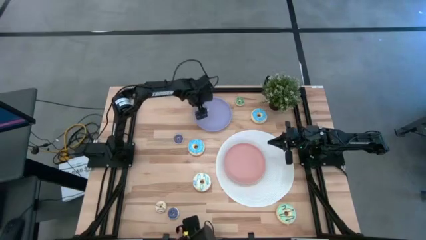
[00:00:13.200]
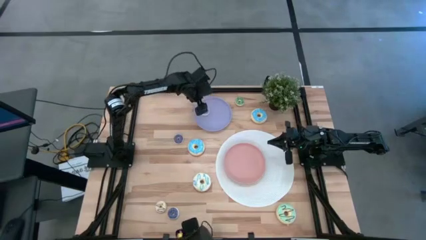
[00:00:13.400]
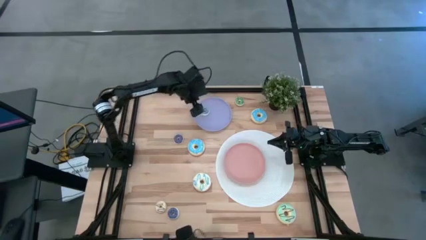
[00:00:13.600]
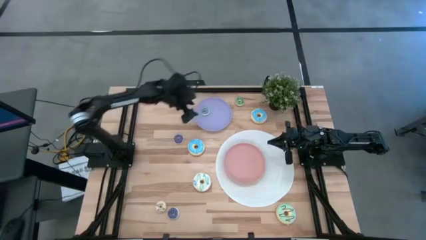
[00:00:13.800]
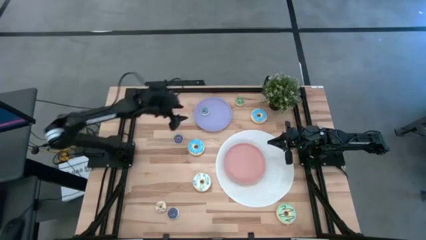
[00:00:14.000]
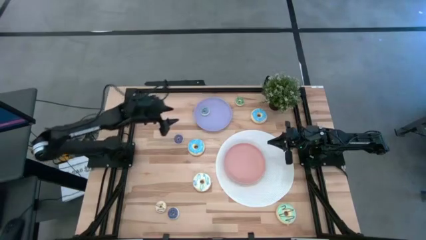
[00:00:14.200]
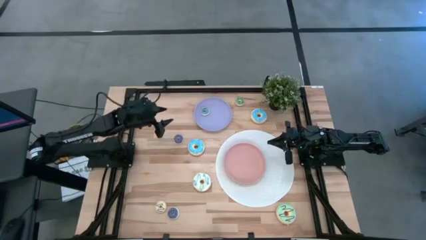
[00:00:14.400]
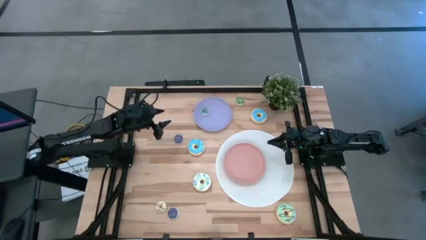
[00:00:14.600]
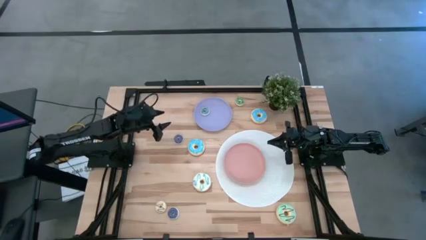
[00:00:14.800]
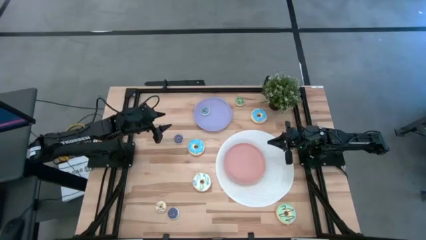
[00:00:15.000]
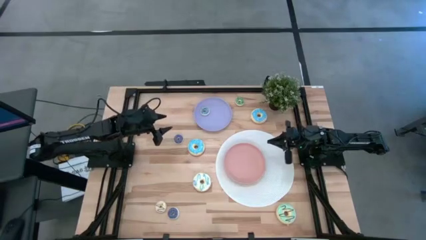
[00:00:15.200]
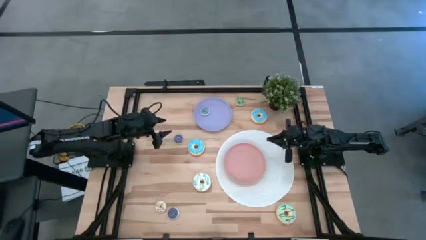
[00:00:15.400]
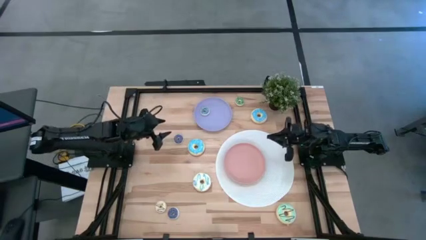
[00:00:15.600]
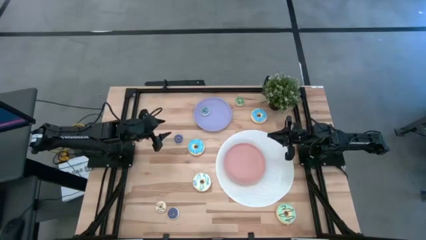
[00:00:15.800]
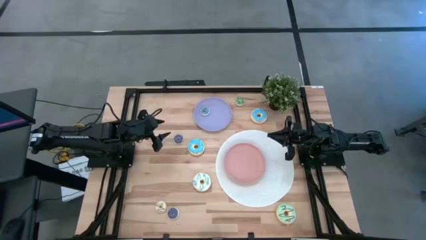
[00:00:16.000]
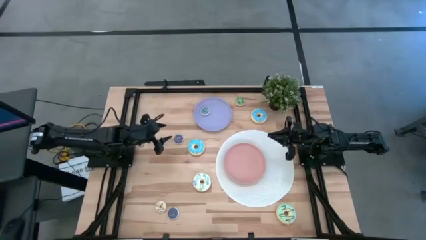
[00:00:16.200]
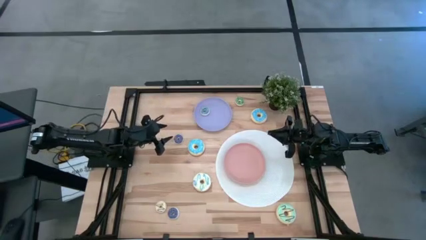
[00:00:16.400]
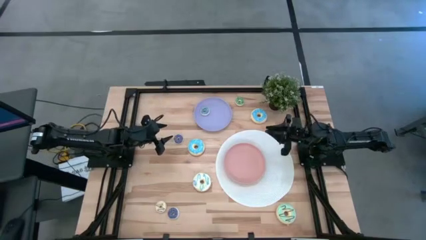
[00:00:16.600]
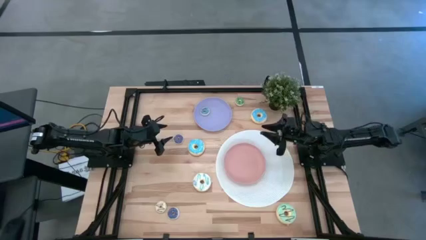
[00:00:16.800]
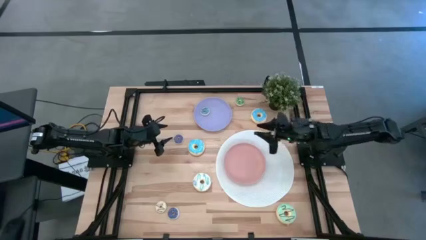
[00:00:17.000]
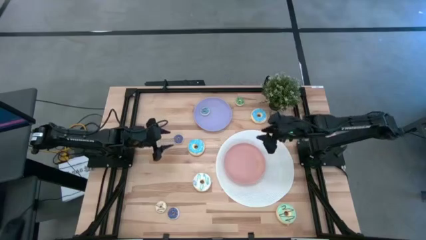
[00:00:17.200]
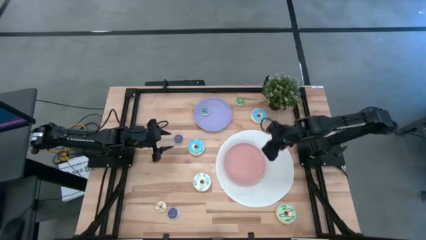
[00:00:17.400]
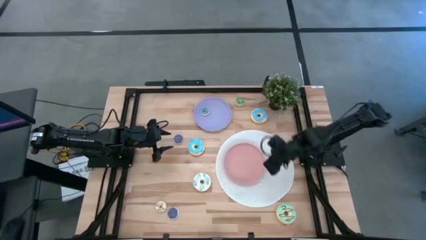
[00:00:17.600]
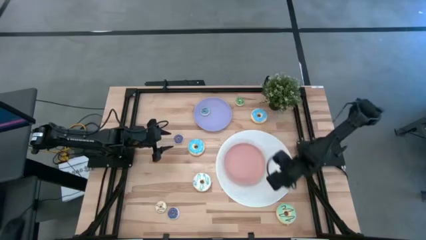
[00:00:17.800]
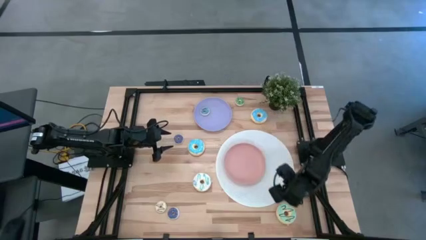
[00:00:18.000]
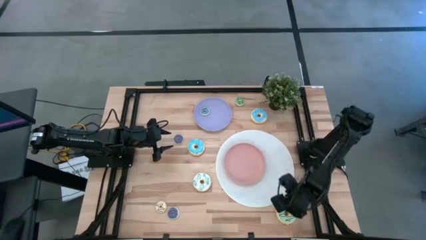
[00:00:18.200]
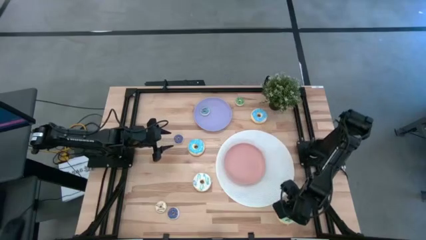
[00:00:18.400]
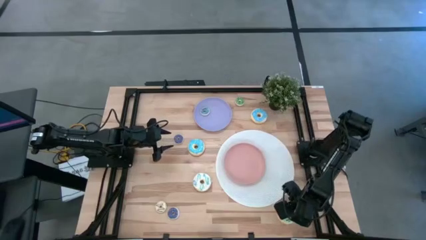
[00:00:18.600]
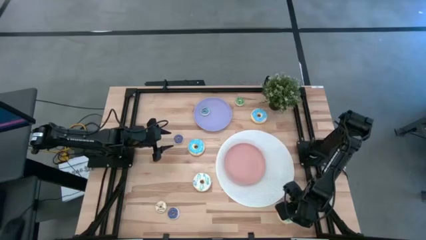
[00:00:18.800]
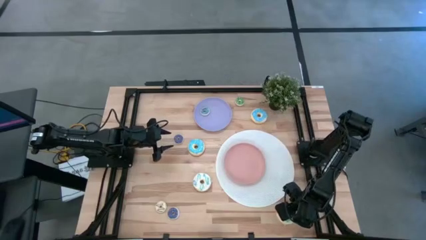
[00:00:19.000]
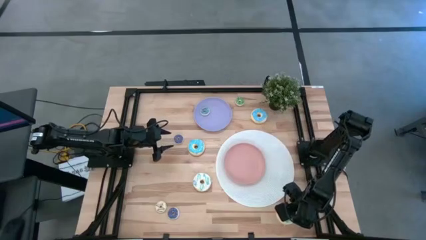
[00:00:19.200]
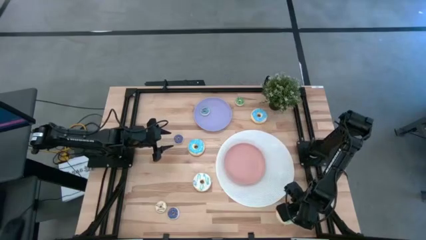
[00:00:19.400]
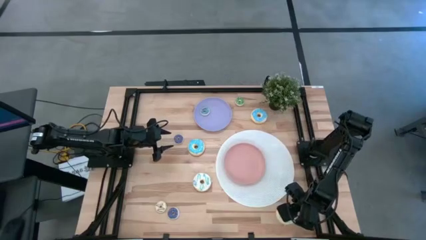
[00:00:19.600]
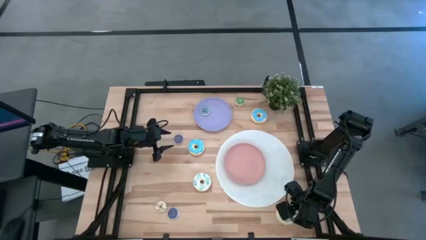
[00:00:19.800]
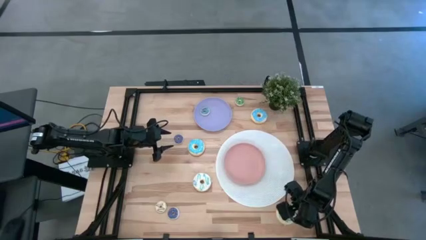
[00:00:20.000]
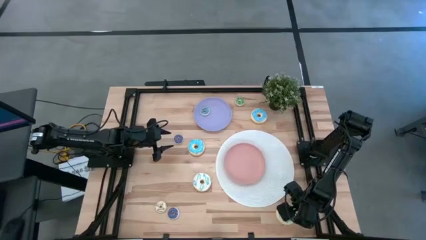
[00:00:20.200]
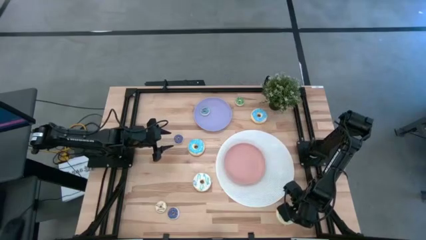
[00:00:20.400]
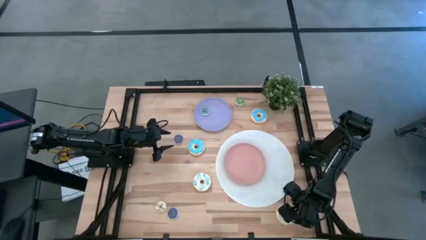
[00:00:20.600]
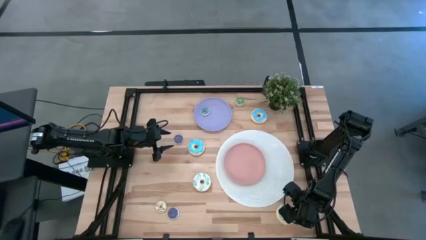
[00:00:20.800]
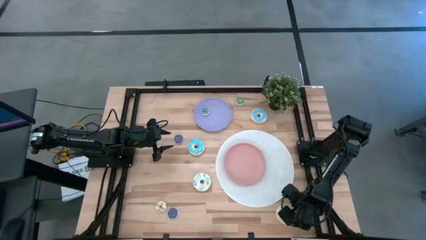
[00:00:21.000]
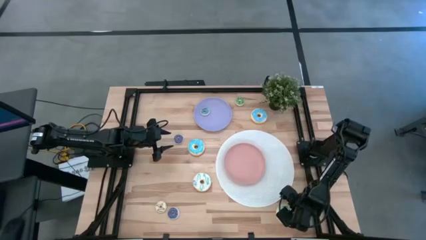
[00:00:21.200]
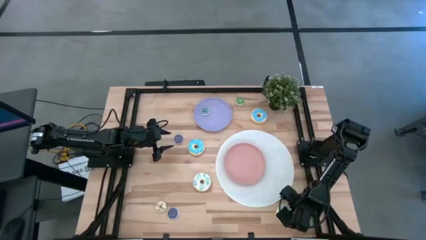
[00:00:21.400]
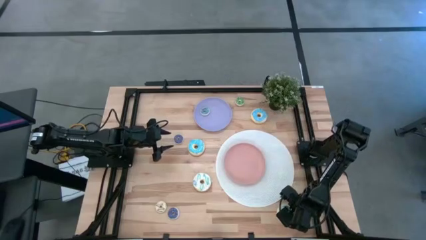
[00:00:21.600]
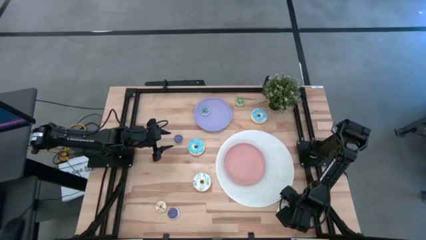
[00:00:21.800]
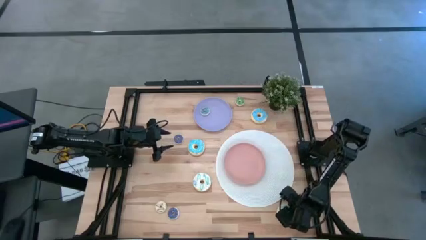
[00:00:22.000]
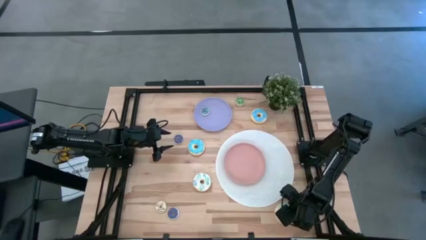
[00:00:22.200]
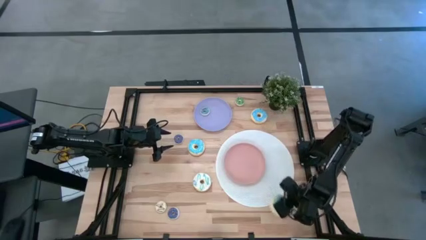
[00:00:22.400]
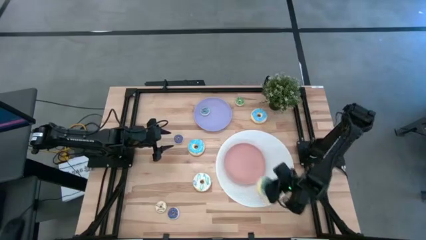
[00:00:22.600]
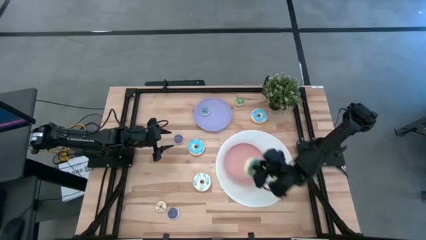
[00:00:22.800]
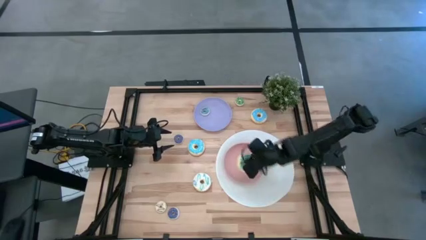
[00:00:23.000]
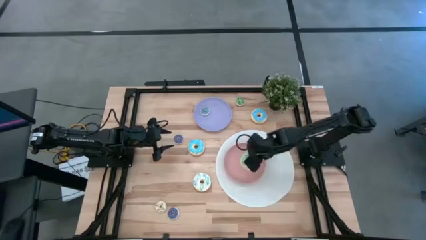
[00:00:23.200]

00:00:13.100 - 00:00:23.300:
Task: Pick & Place donuts
Put the big light blue donut on the orange plate

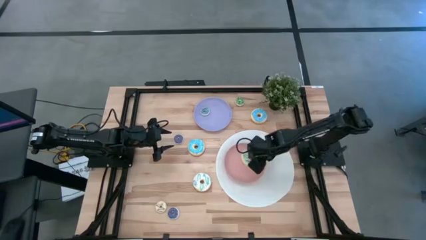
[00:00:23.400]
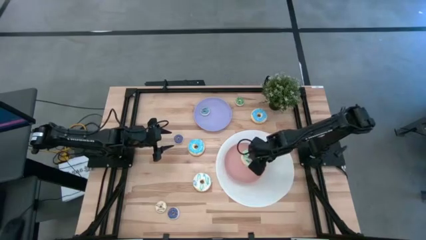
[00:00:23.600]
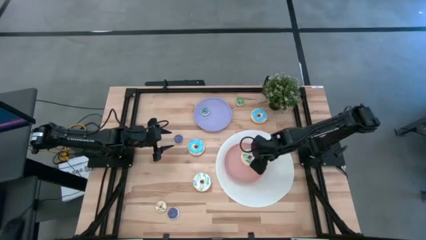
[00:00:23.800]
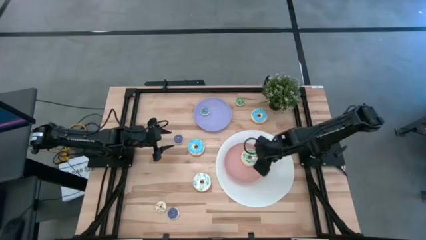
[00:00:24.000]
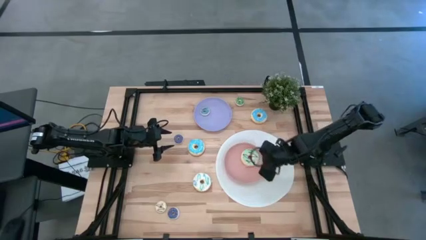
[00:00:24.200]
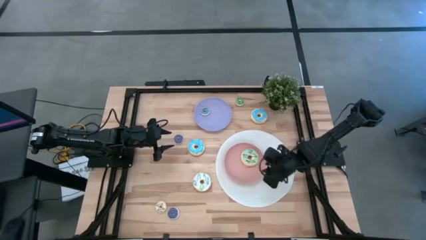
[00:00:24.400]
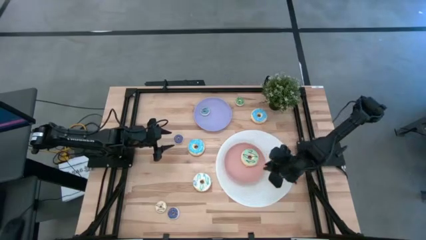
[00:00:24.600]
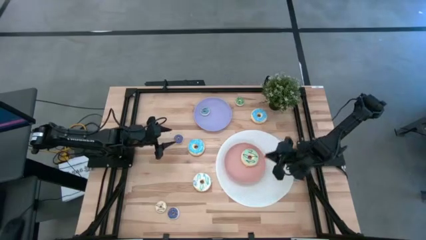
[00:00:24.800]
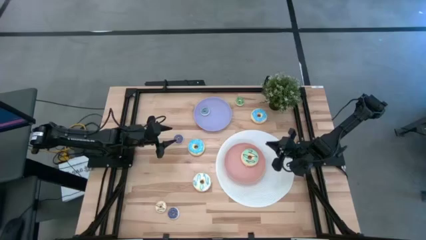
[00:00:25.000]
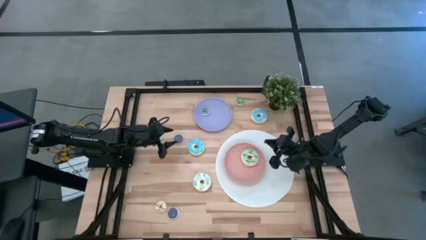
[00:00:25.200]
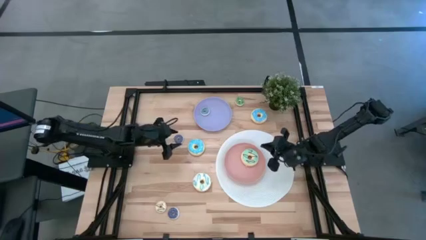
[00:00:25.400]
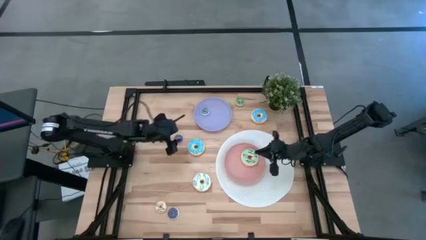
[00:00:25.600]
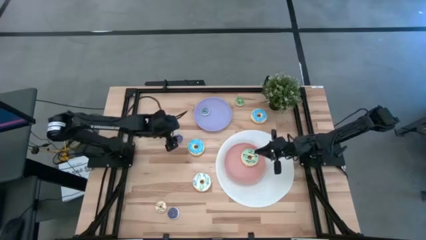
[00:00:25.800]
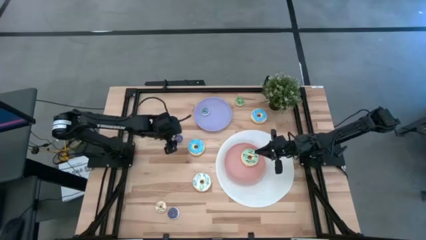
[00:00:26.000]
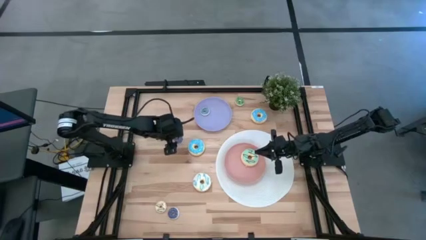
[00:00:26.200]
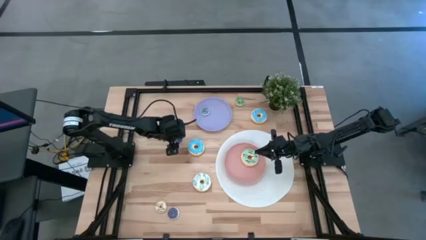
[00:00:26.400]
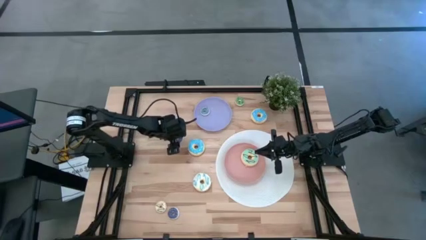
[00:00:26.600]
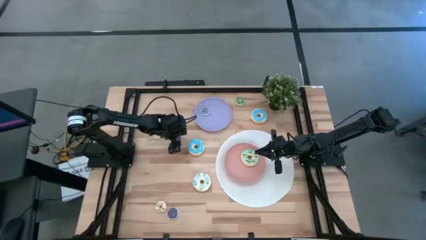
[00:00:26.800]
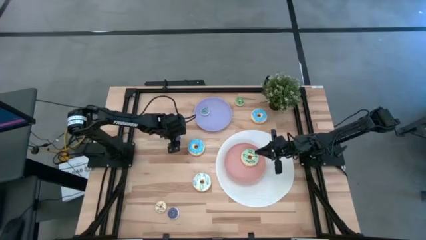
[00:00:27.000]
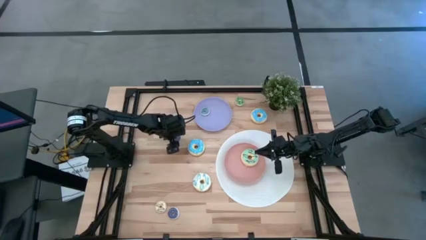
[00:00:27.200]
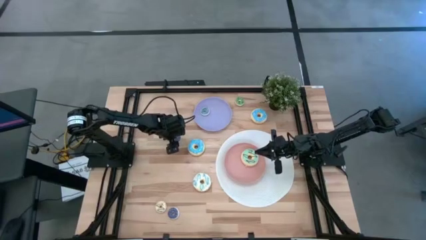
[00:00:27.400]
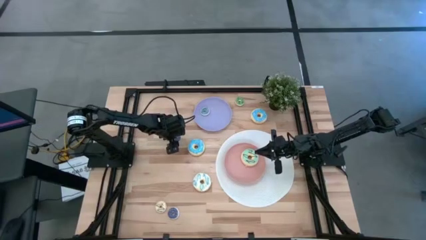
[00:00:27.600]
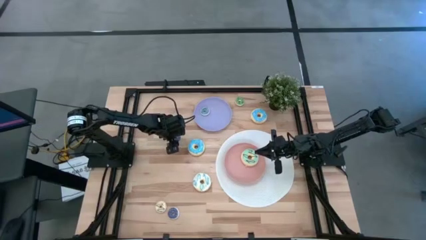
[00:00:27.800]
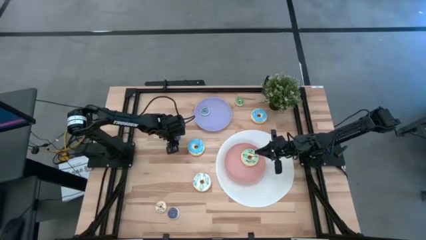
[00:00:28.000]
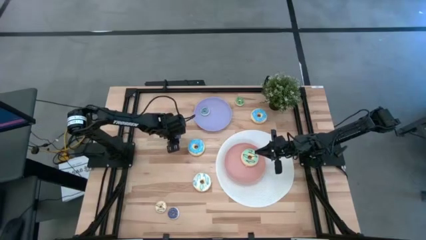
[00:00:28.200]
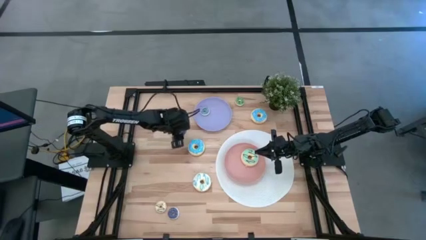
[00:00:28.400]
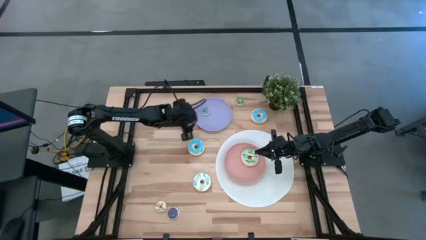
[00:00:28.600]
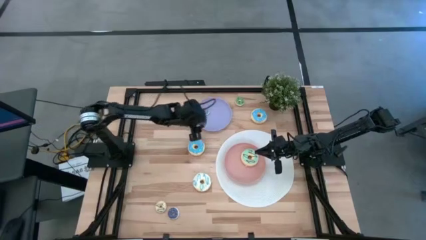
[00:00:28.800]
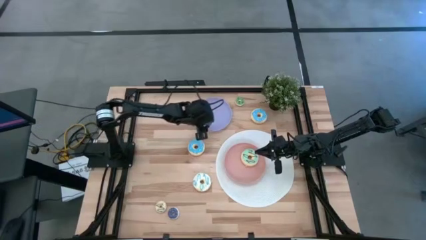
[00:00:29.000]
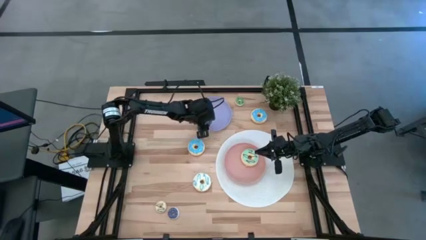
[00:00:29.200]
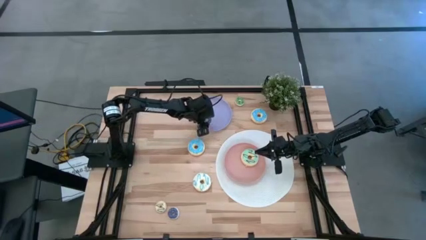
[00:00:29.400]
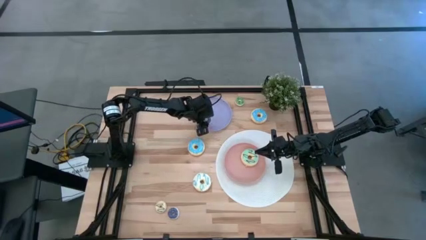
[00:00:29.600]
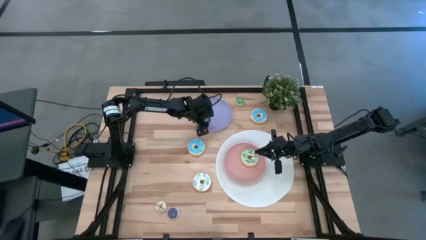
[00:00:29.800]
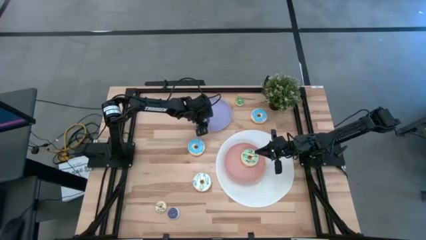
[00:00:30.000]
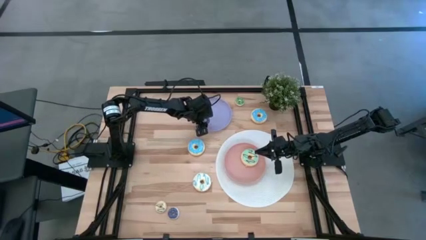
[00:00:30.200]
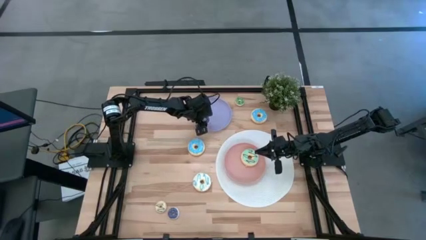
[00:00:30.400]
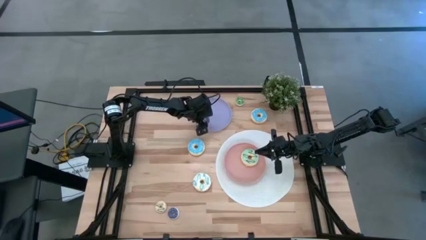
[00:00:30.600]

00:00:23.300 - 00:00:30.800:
Put the top small dark blue donut on the violet plate
